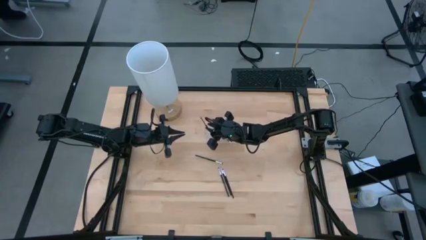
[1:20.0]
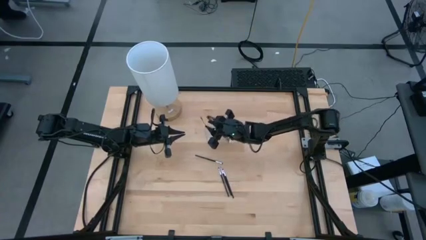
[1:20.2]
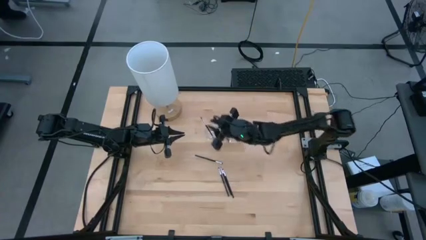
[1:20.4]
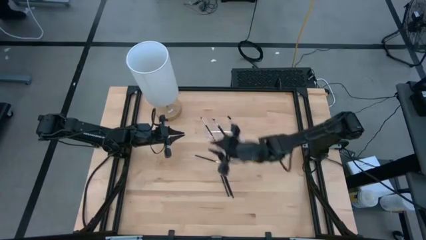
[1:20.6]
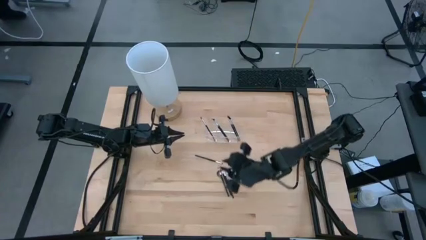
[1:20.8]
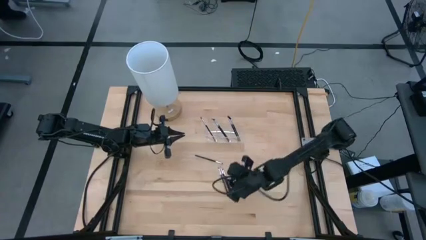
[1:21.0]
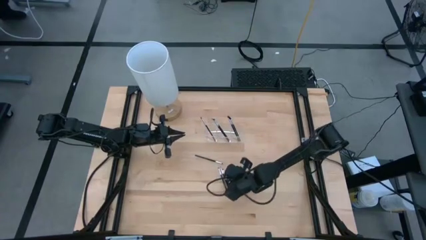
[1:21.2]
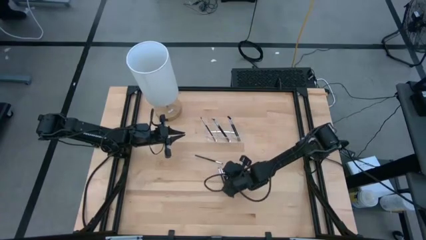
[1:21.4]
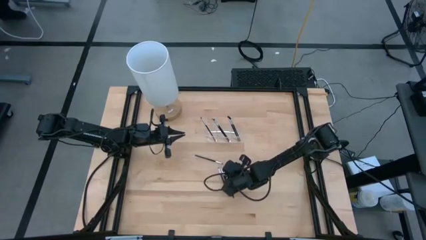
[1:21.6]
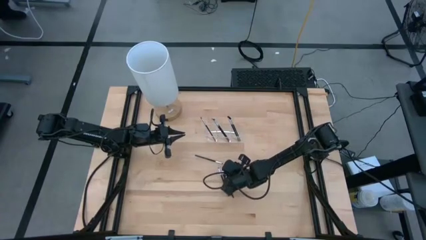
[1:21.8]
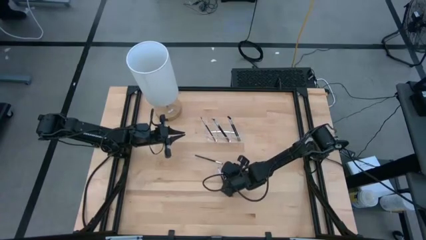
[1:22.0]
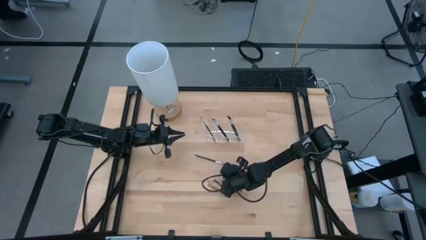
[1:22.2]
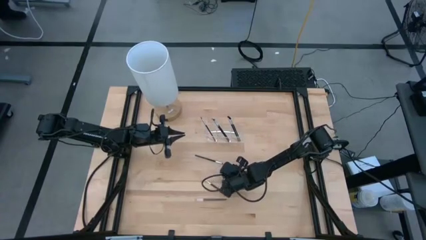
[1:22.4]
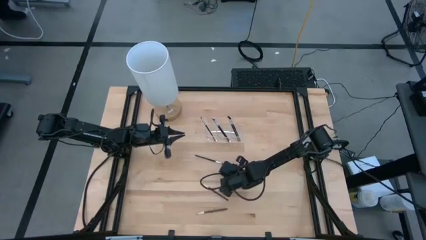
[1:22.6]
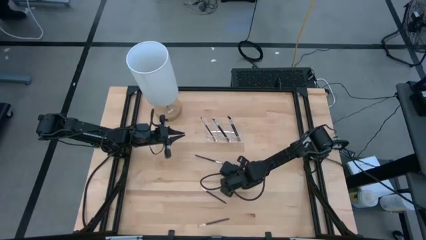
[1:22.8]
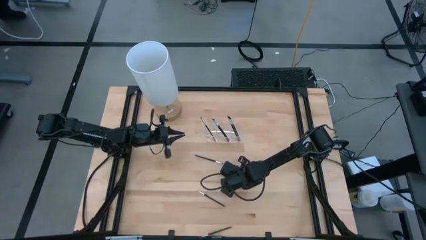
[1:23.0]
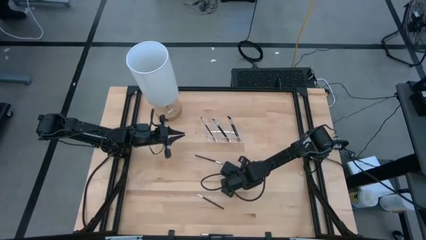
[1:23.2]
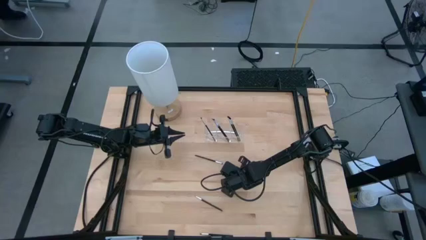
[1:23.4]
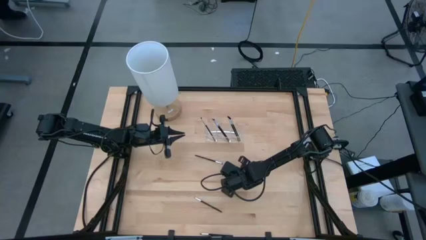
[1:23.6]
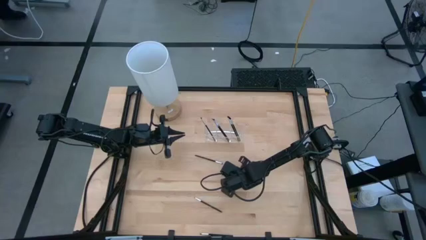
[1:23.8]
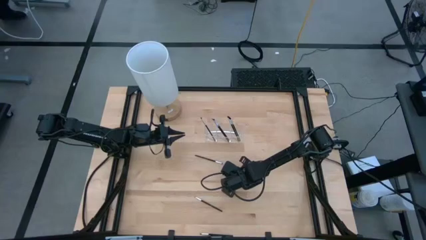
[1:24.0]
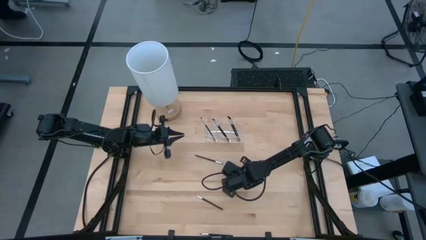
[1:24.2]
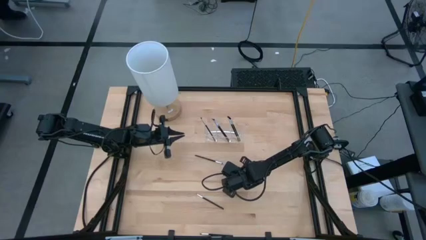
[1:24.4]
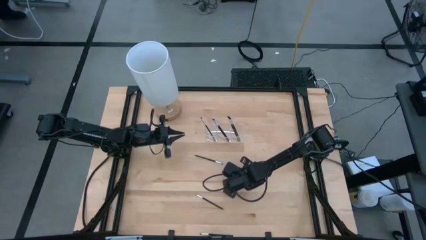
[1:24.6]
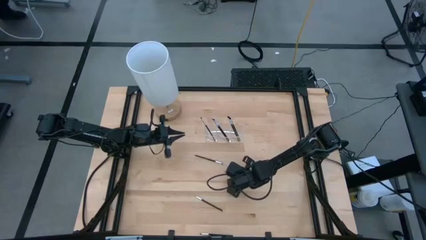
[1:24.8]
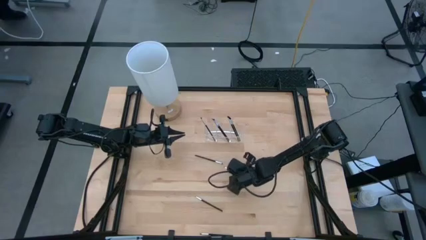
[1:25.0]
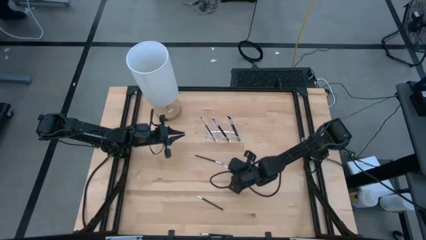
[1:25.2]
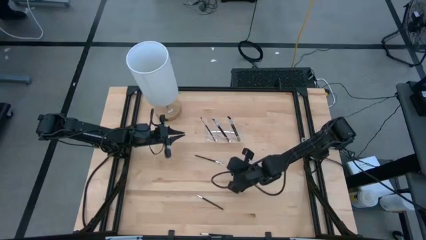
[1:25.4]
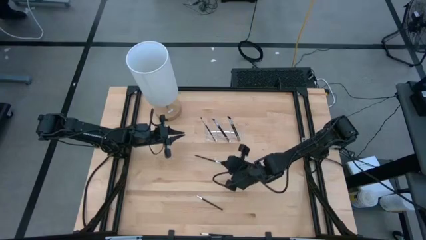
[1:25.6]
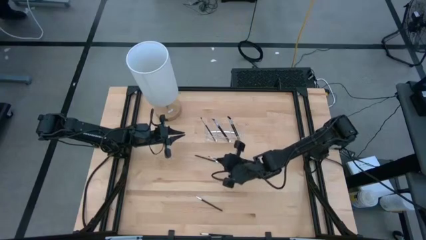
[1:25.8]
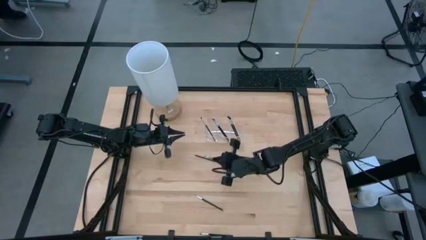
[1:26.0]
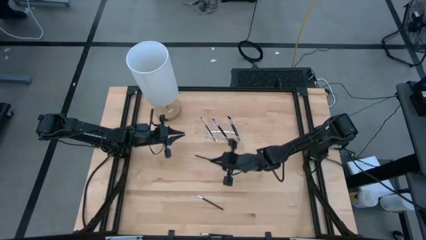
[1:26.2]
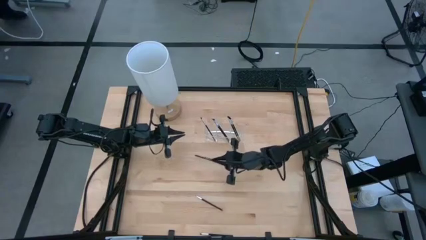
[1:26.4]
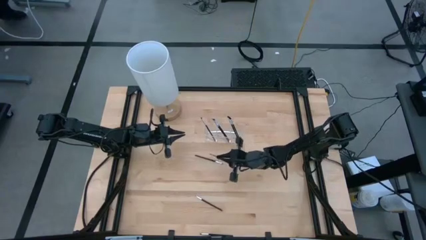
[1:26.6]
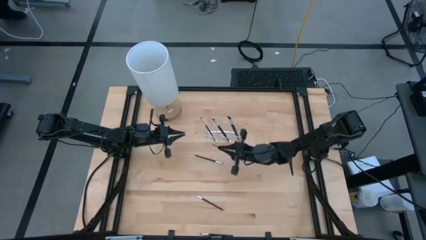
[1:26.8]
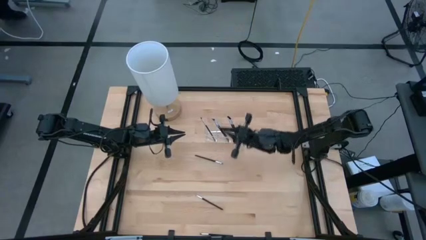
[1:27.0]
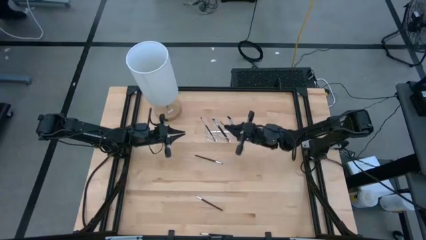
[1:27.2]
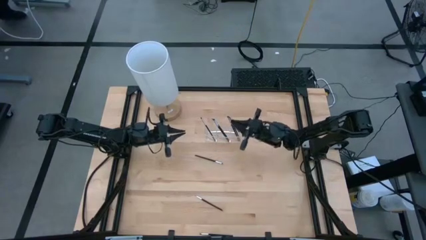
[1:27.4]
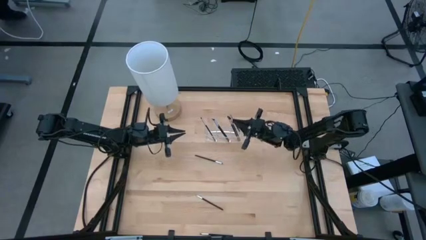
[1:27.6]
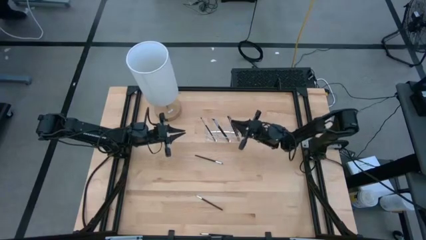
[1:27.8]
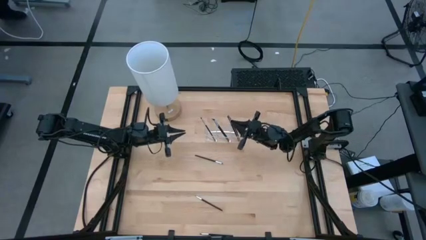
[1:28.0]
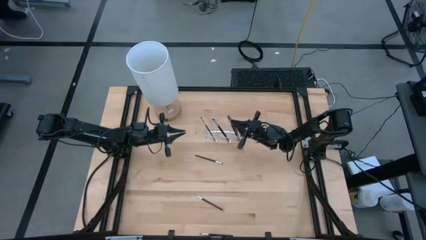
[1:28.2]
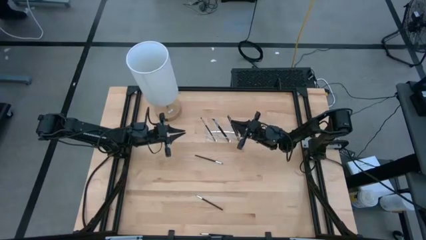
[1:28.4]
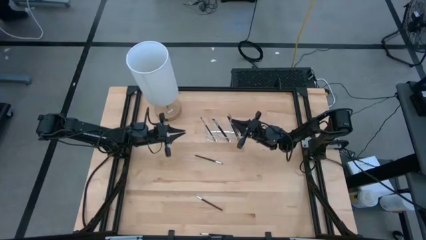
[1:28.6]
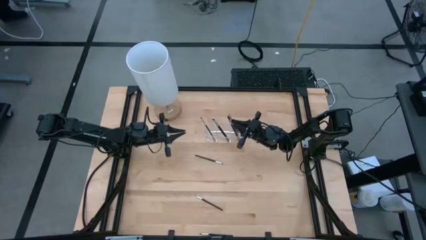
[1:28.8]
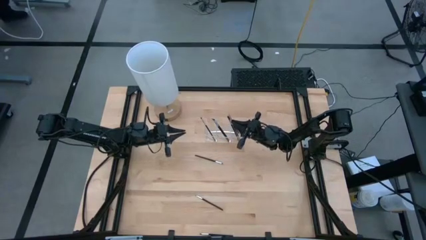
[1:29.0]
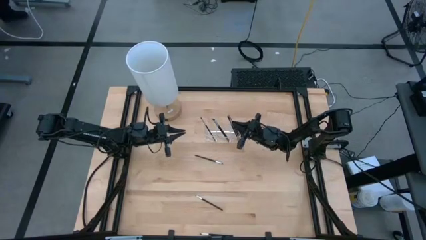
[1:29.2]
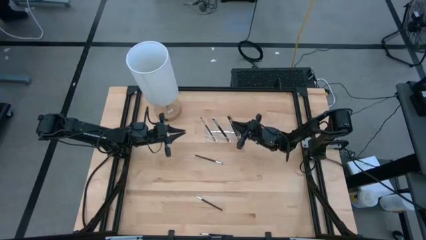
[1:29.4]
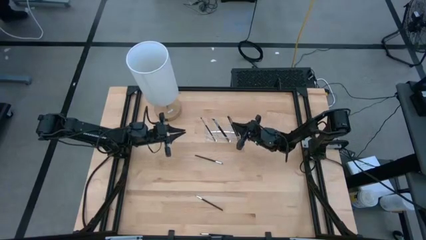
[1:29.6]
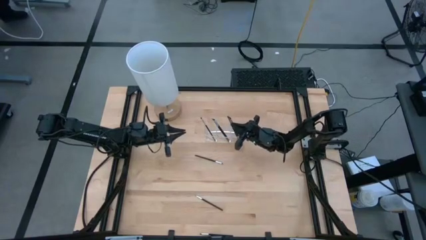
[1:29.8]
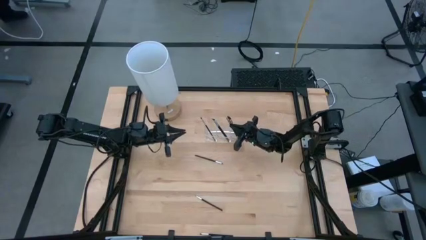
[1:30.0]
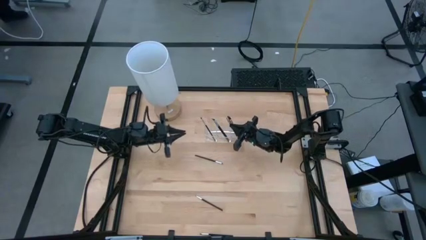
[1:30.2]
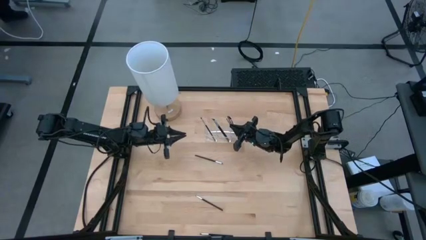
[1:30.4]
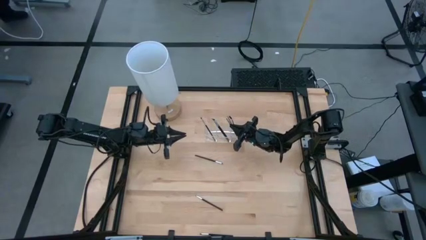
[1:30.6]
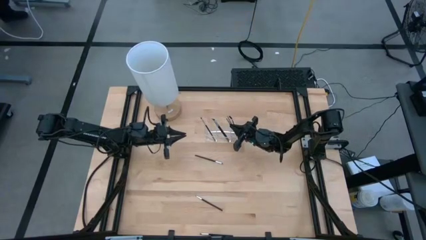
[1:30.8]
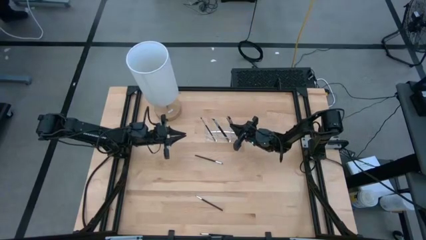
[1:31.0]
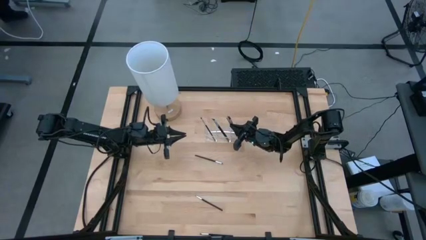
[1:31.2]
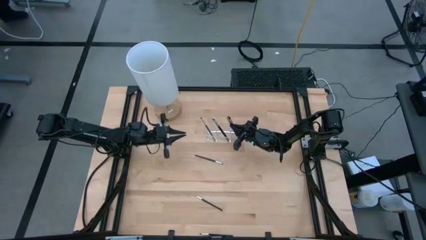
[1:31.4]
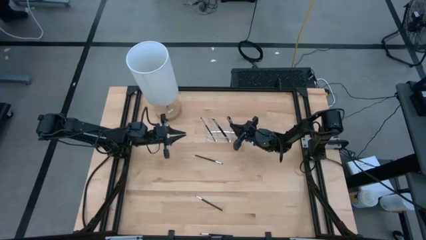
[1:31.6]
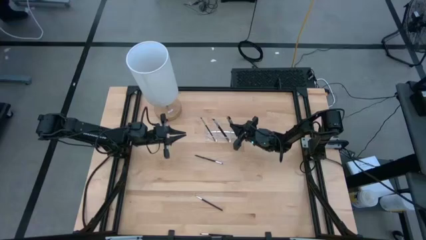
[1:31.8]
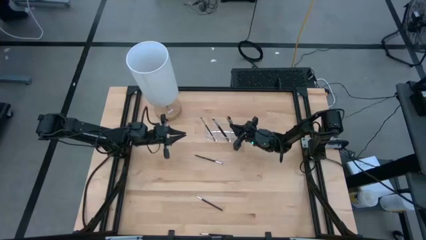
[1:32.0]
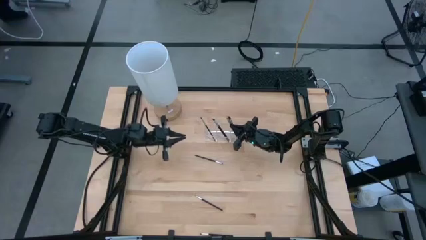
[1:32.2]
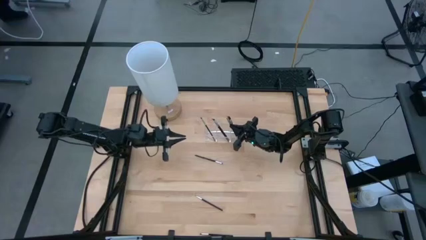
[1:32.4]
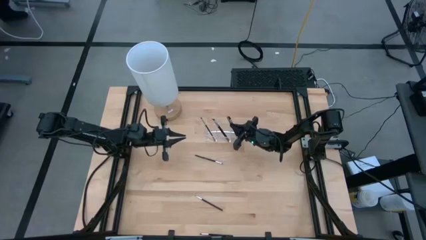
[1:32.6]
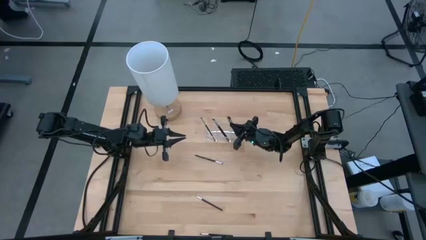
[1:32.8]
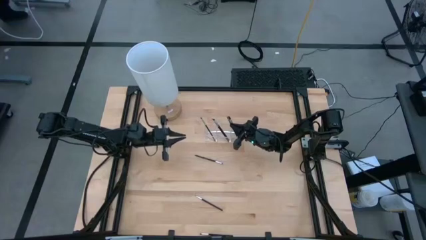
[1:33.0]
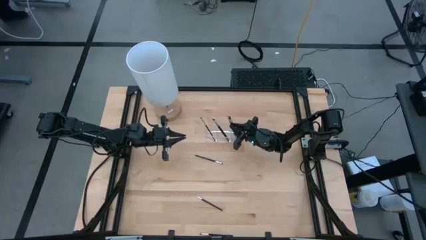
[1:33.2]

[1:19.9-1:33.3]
Task: Put items in baskets/containers
Put the black eyeshadow brush into the transparent organizer

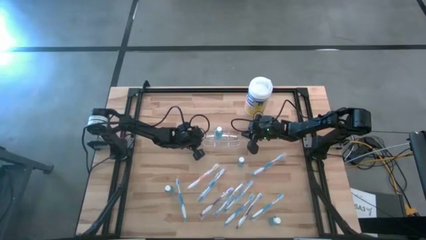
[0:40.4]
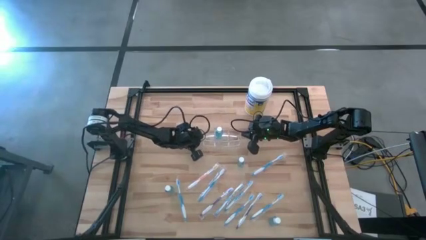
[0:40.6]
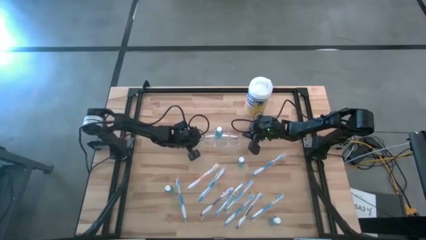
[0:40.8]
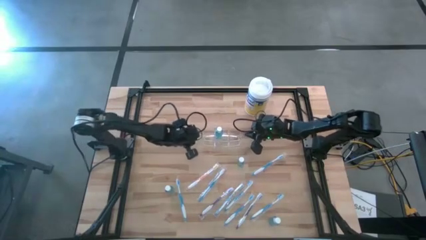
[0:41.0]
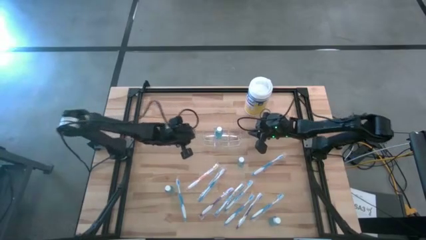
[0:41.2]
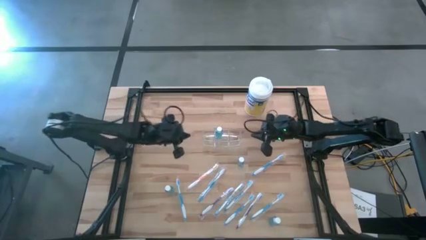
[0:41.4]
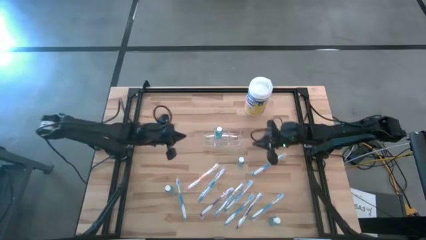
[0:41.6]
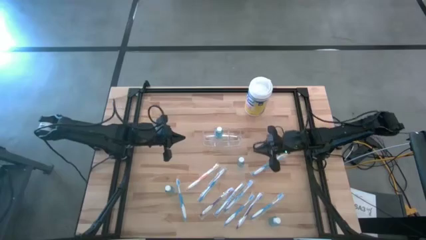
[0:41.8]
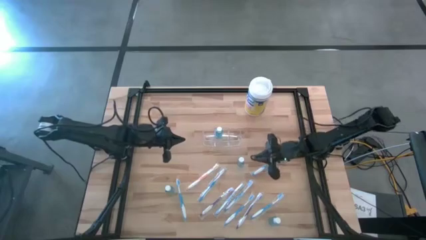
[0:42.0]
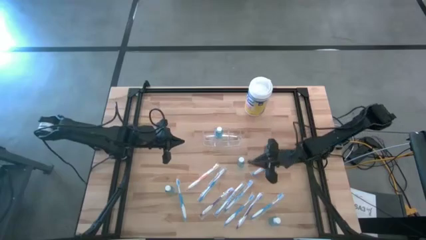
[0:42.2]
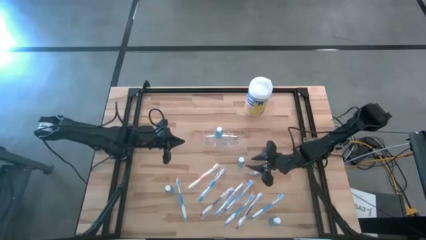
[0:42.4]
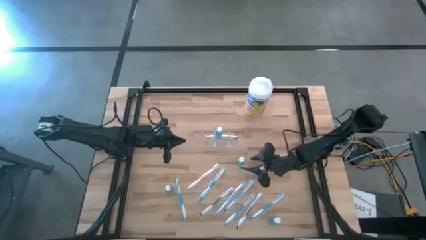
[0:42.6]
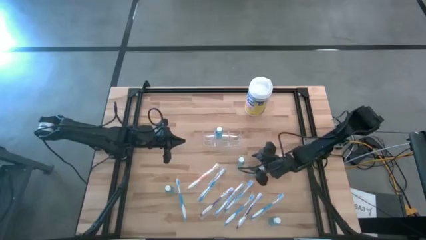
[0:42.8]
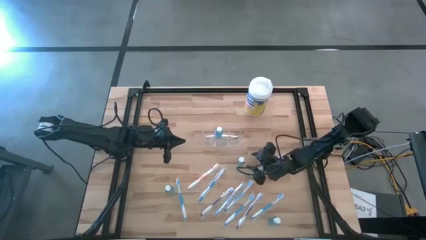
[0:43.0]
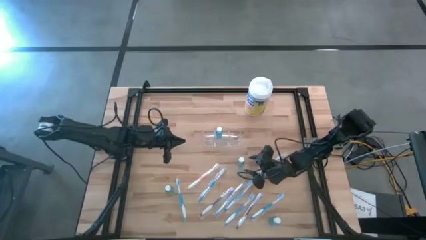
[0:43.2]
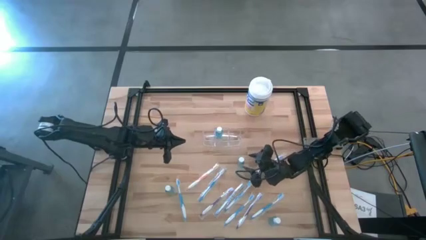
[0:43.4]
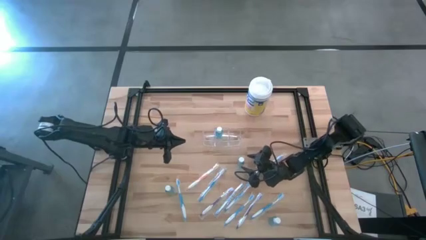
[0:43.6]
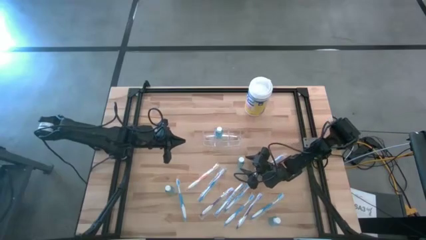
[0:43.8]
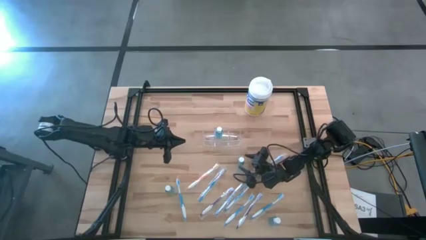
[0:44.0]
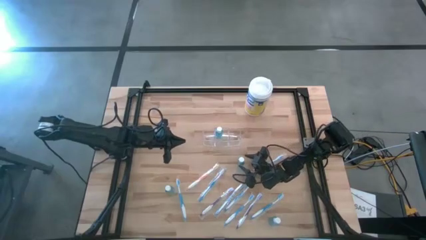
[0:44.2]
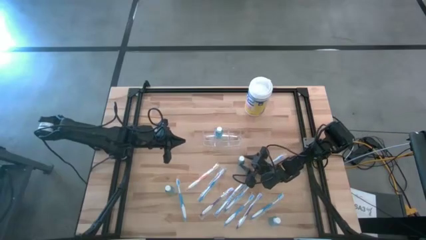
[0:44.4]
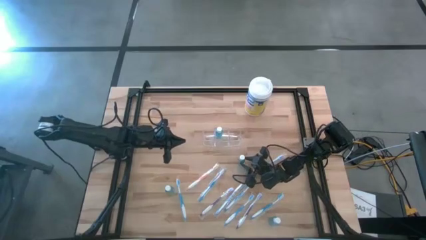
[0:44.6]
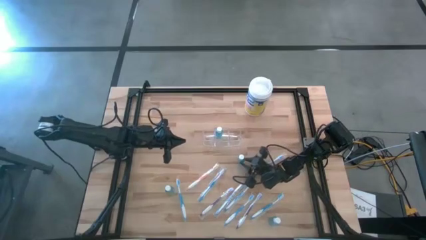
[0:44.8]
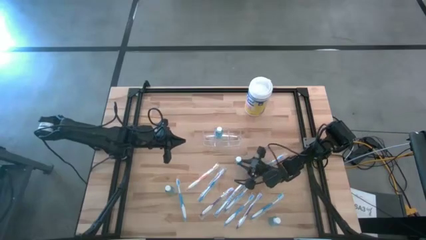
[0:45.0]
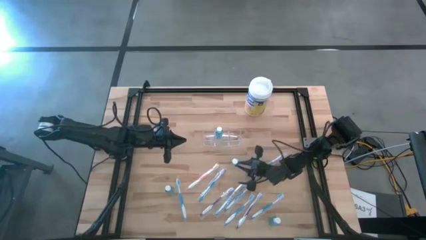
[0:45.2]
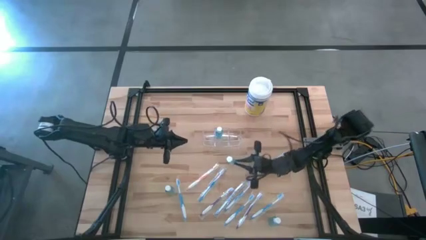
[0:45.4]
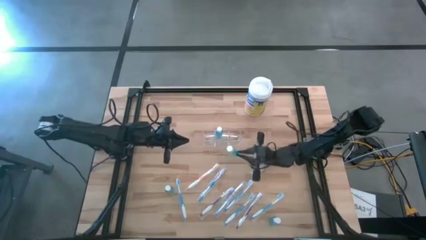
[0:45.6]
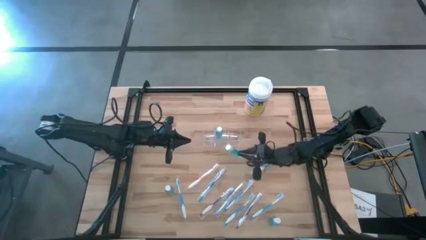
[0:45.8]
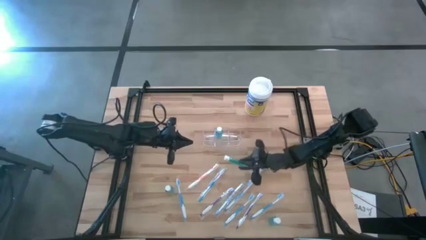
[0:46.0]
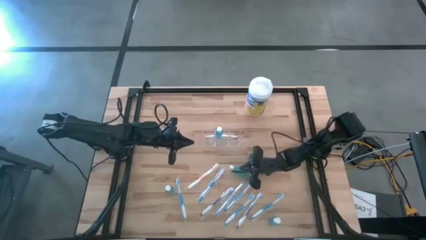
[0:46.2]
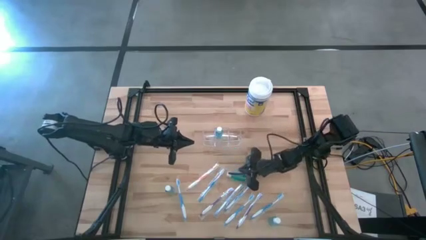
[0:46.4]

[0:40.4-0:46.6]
Task: Pick & Place toothbrushing station
Put the blue mouthwash into the transparent organizer
